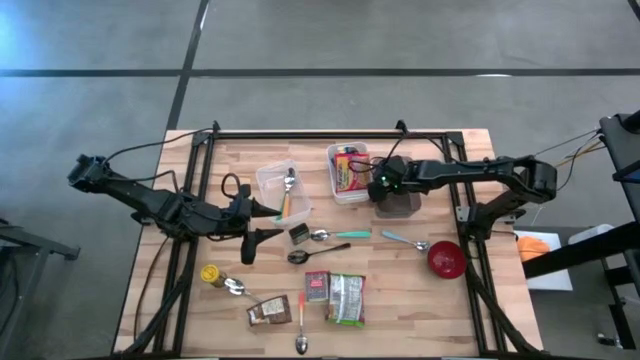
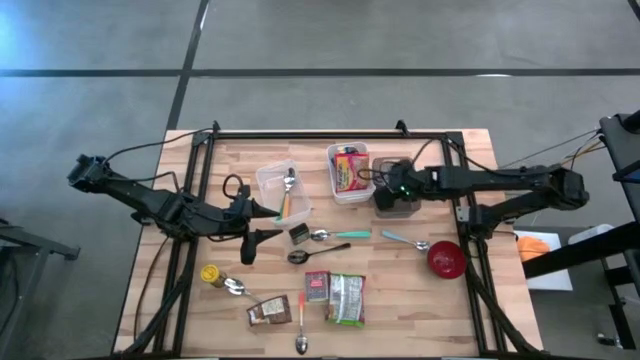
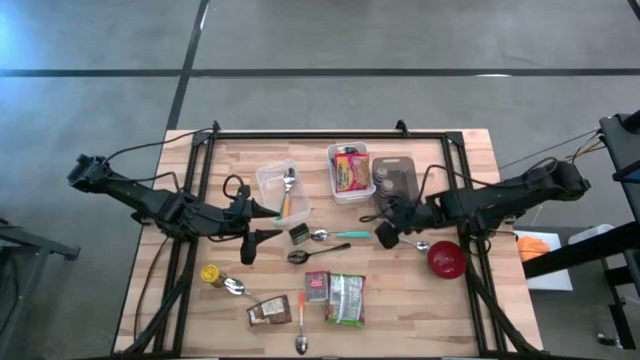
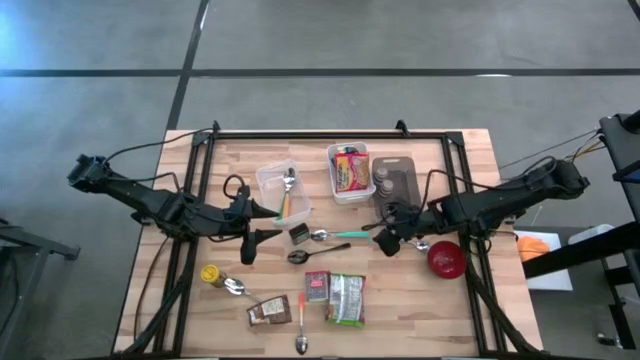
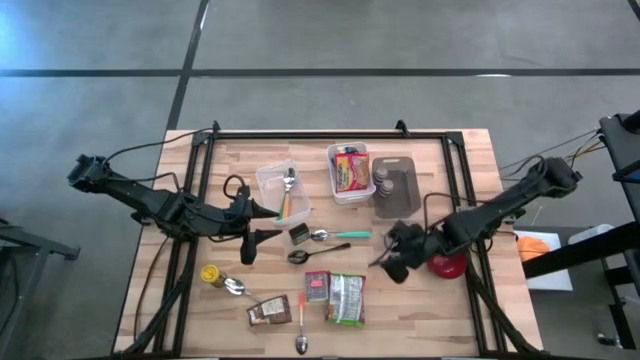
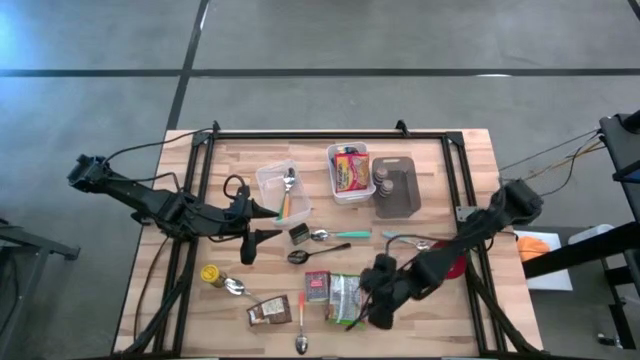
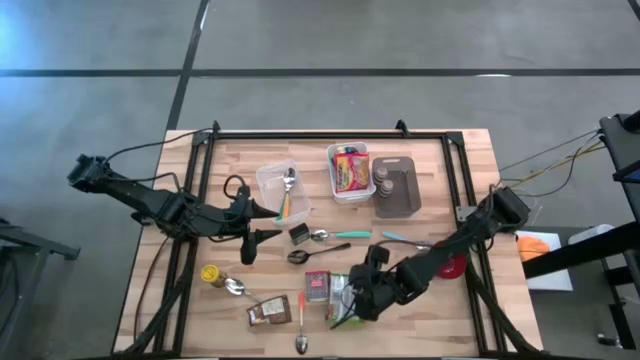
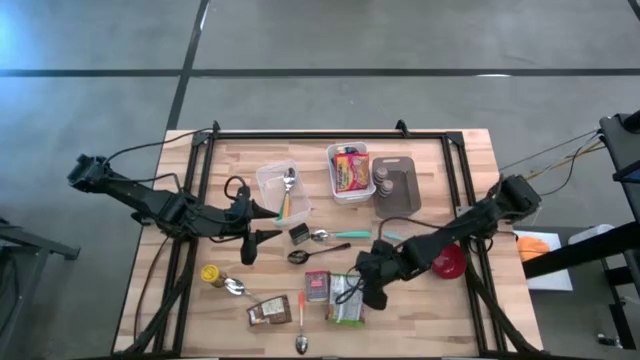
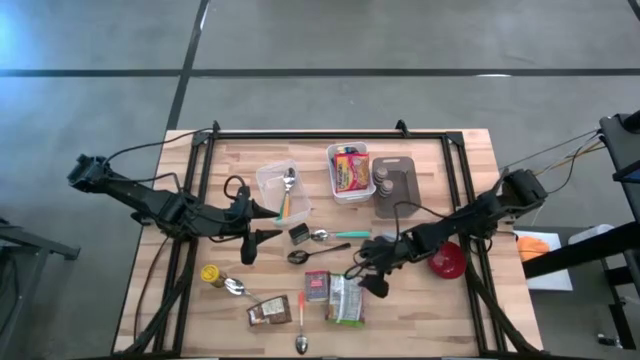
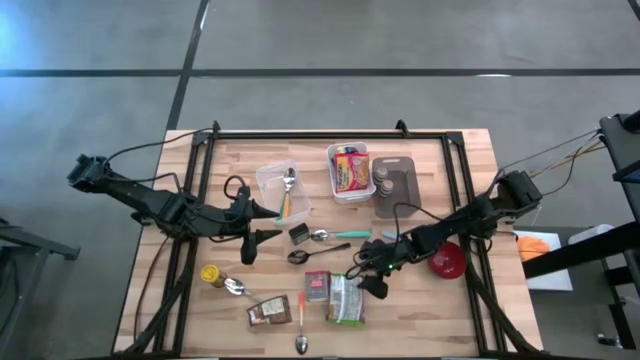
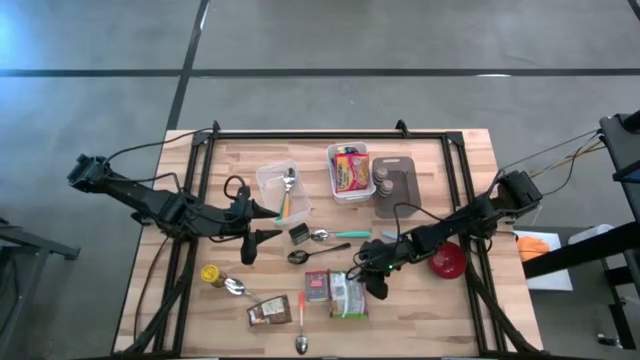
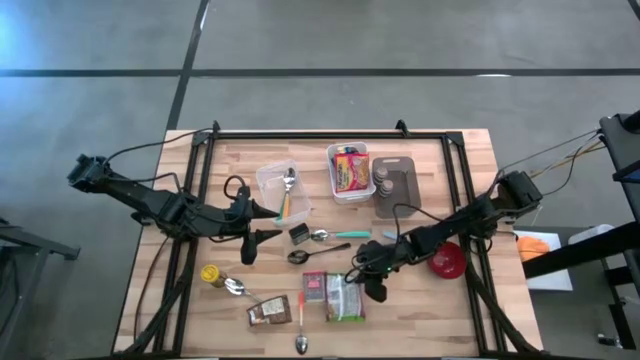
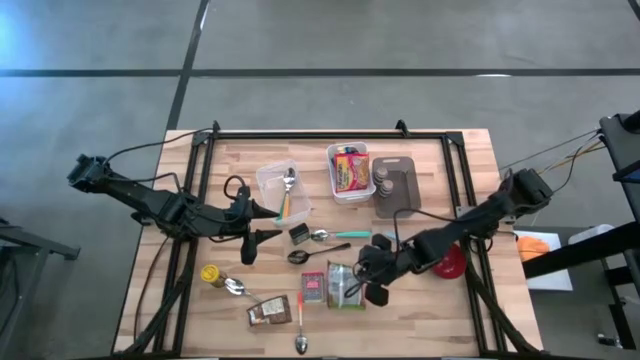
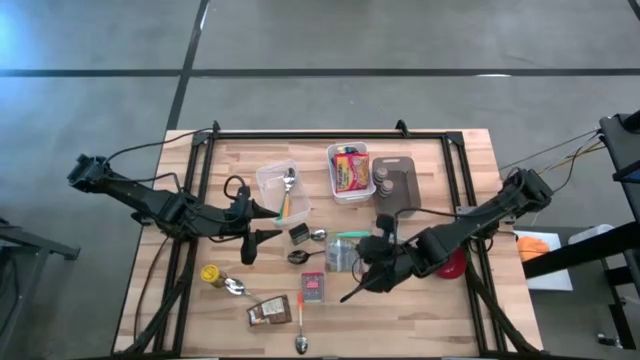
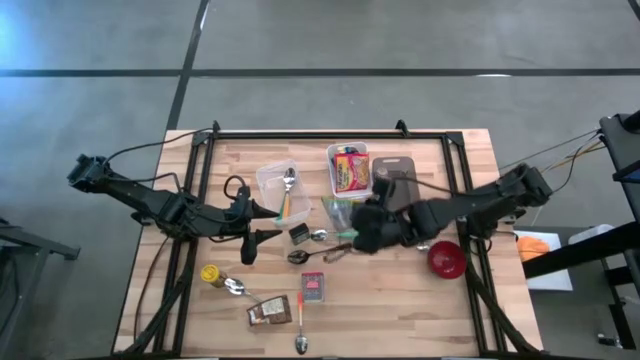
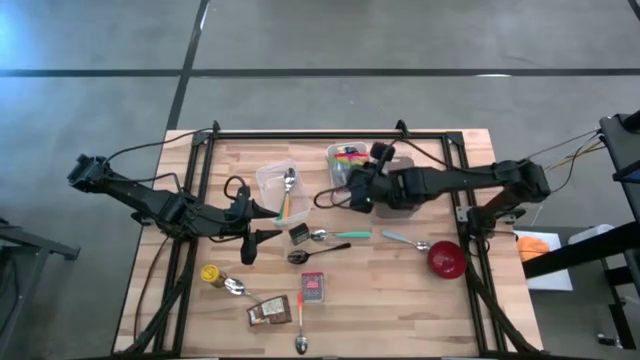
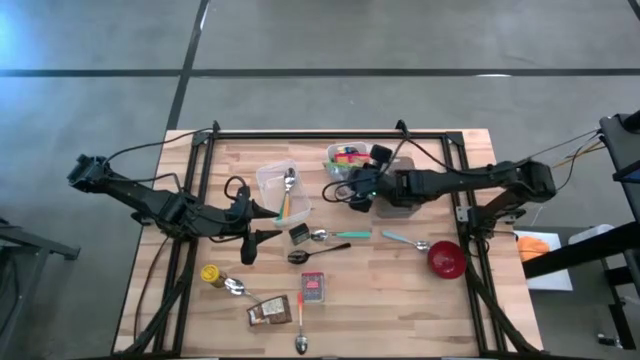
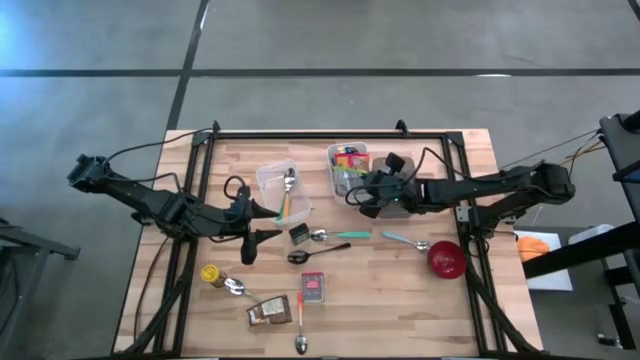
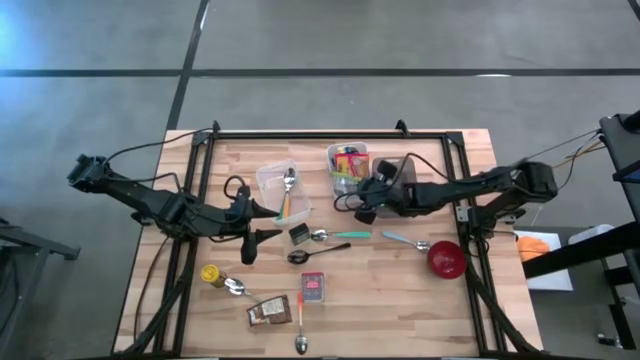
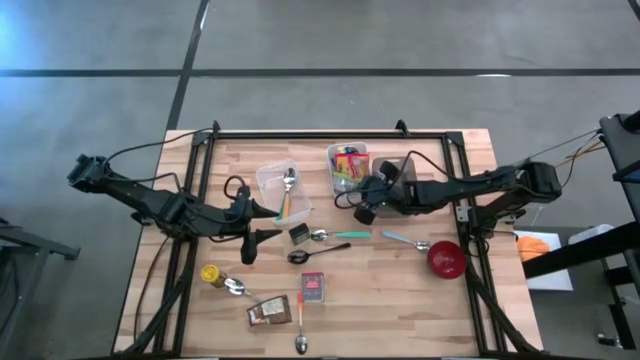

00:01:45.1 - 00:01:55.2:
Put the green noodle pack into the white bin

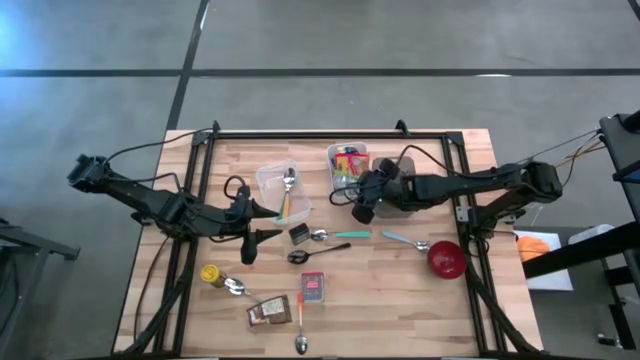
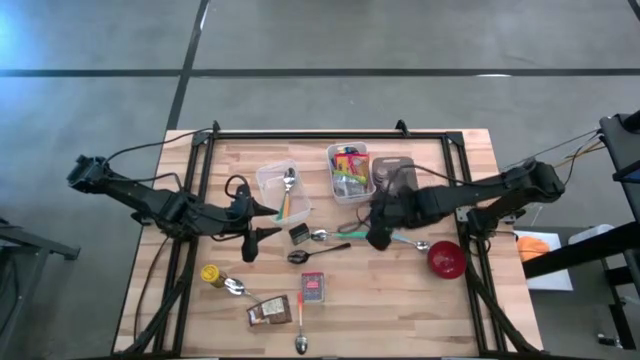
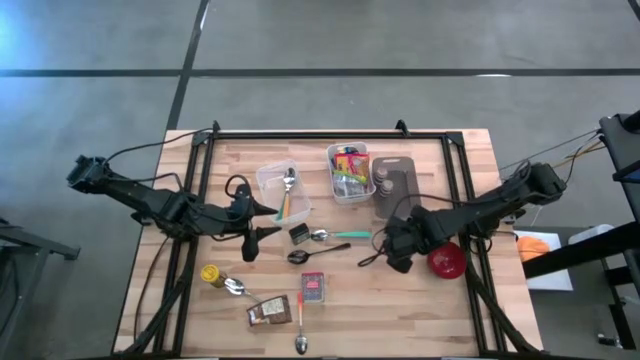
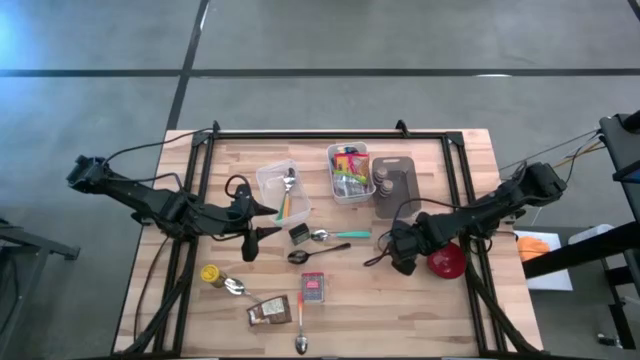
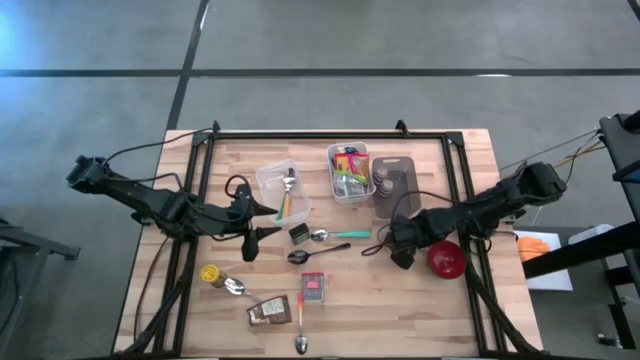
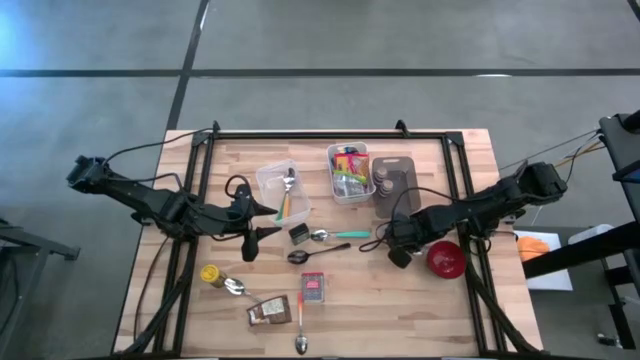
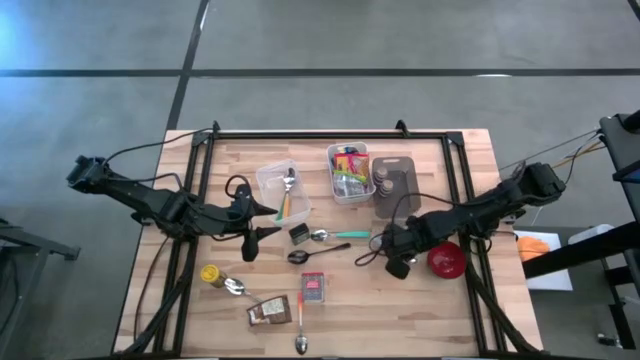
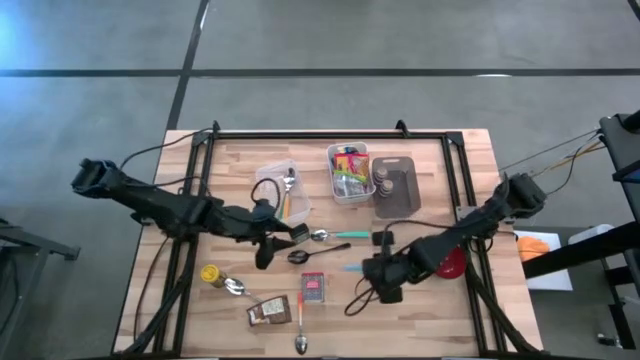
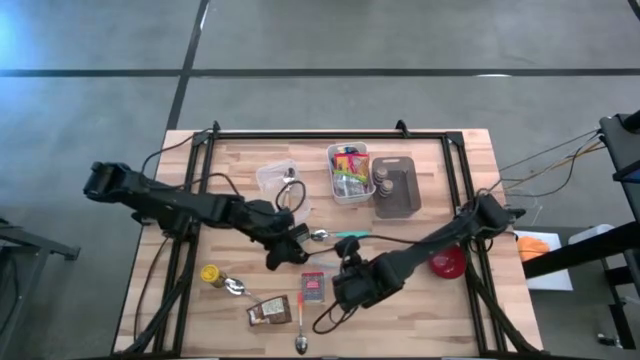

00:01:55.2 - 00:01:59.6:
Put the blue spoon into the transparent bin

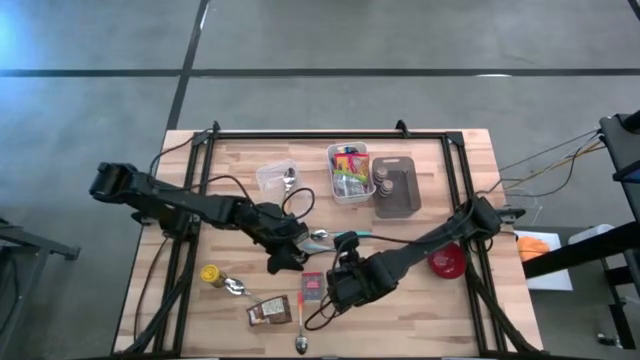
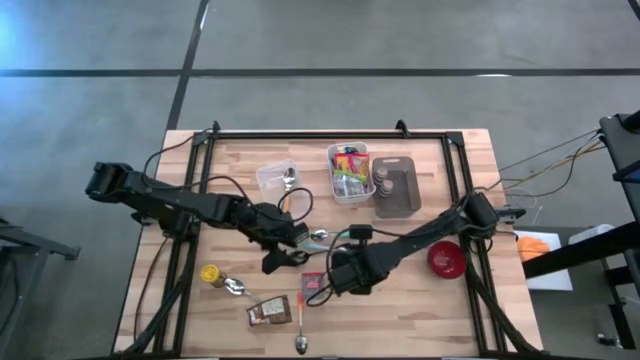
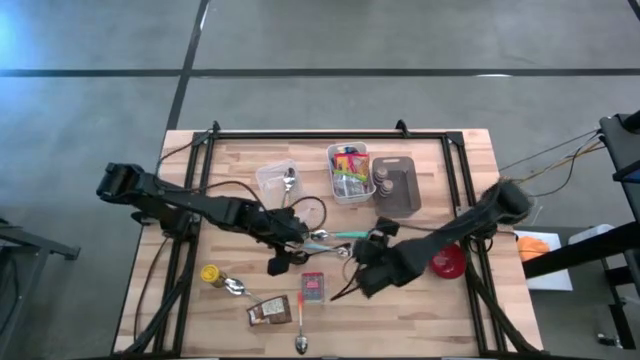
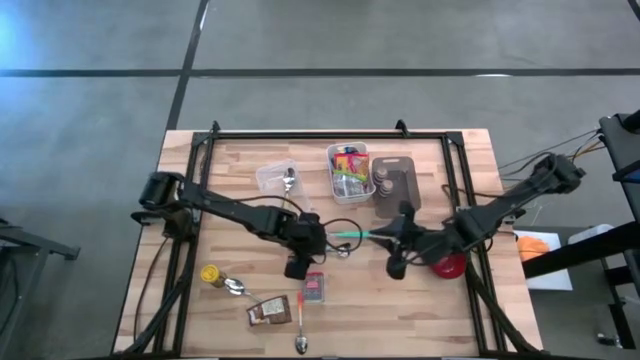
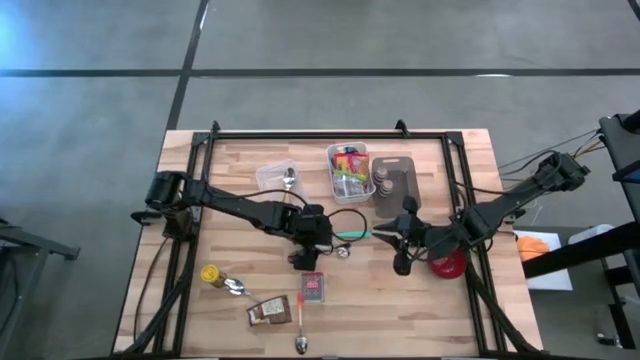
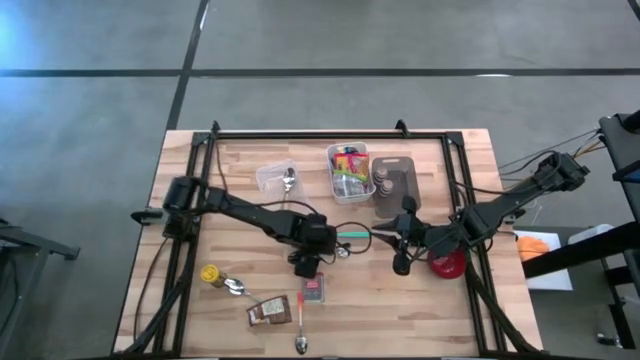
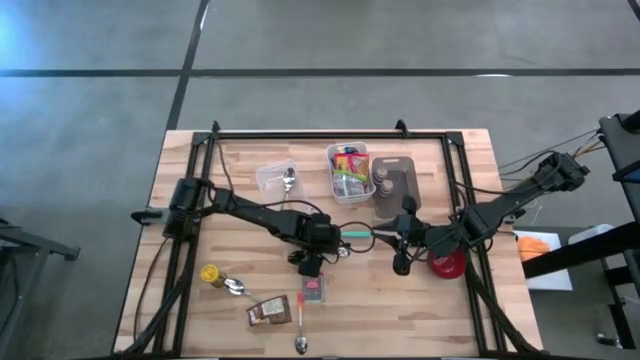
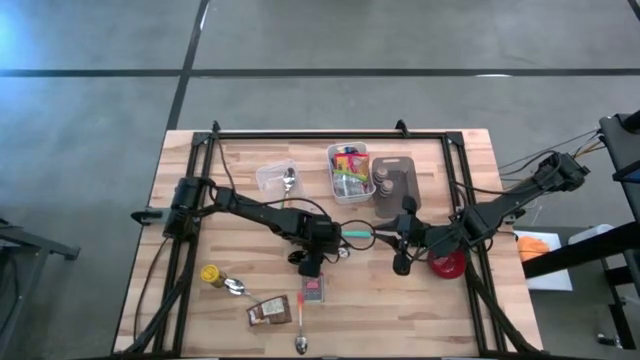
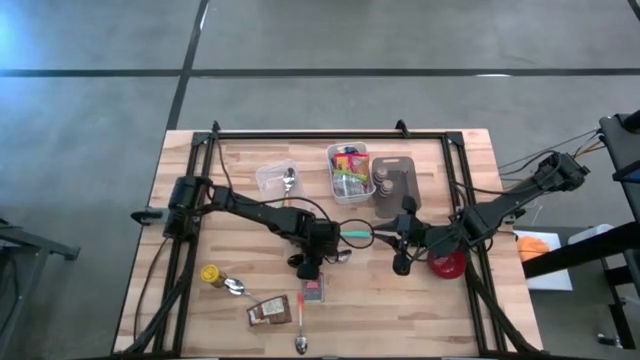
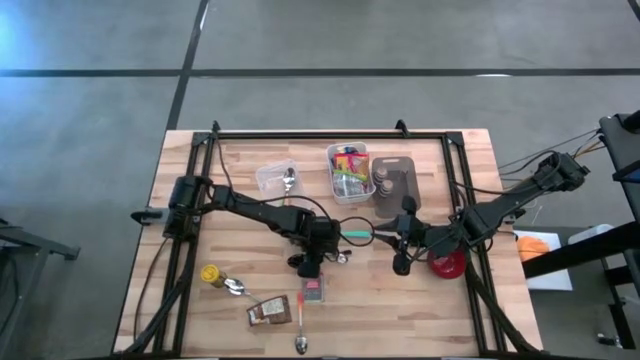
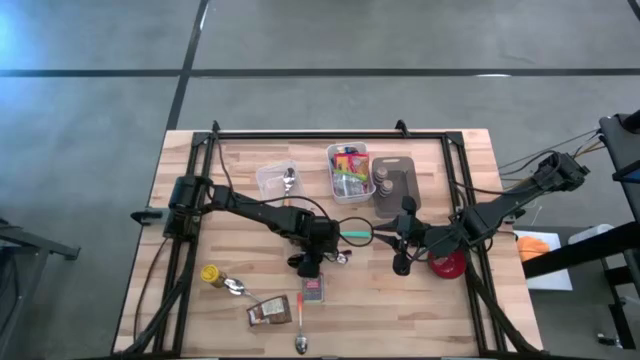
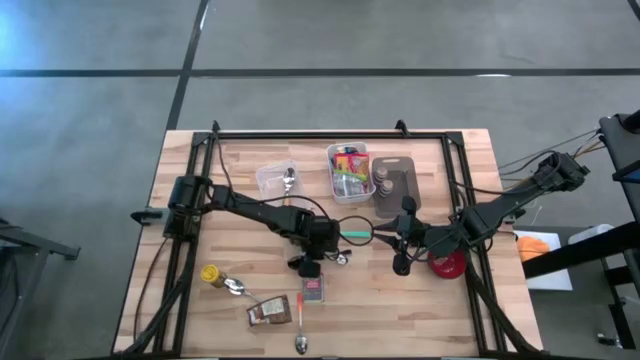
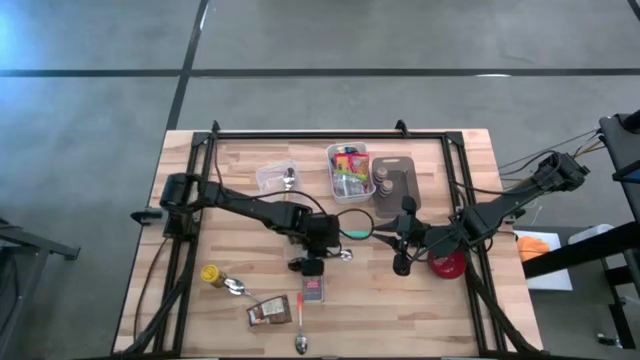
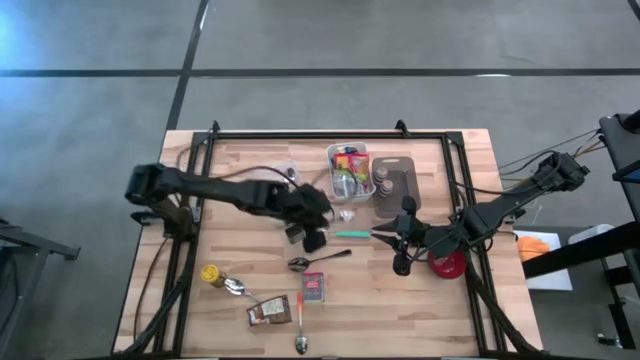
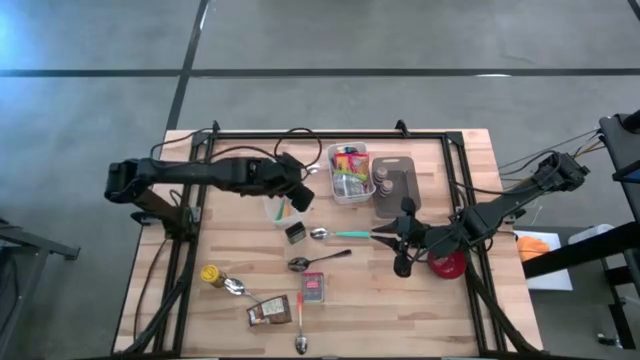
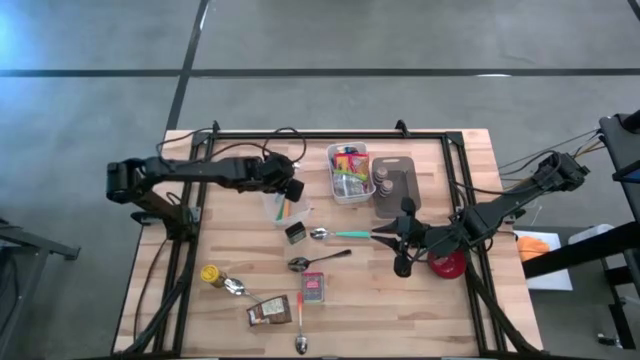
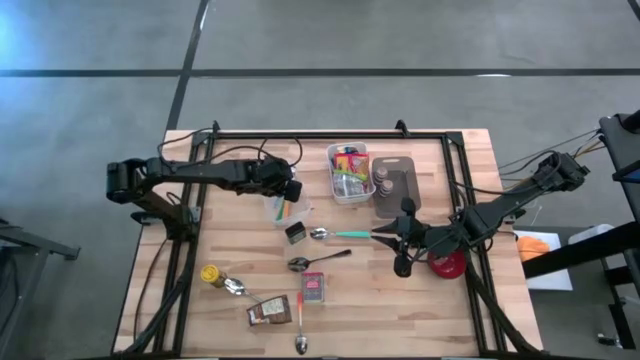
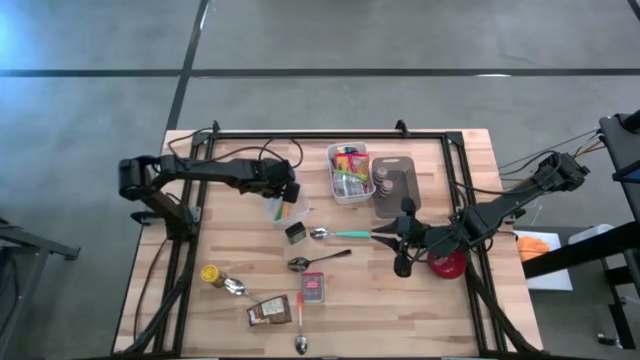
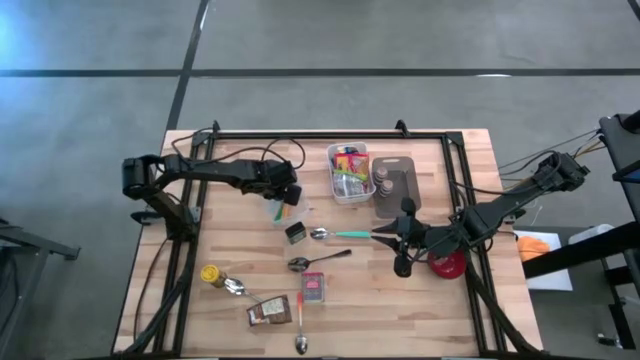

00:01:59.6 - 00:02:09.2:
Put the blue spoon into the transparent bin
